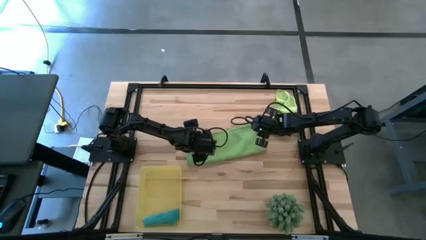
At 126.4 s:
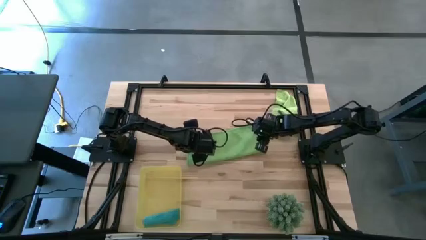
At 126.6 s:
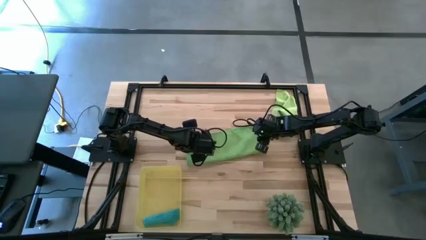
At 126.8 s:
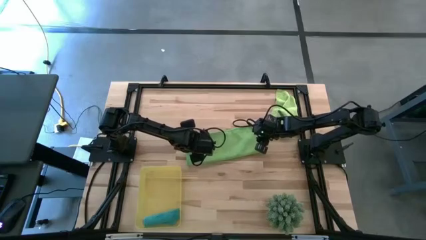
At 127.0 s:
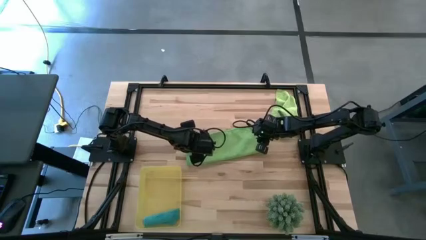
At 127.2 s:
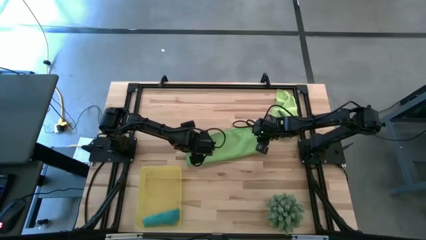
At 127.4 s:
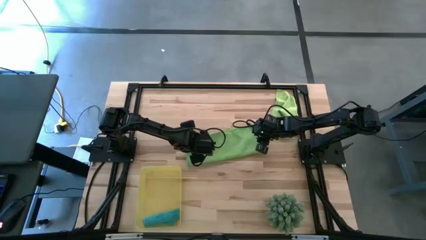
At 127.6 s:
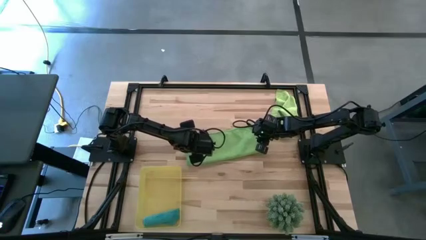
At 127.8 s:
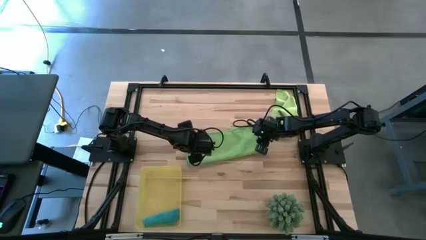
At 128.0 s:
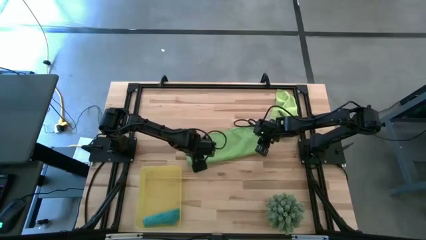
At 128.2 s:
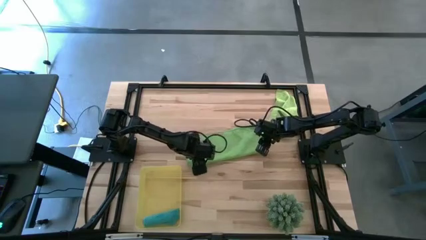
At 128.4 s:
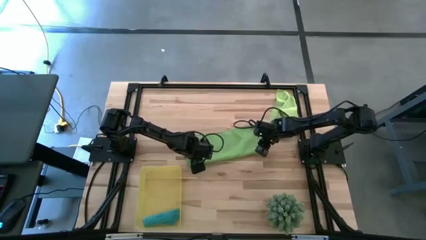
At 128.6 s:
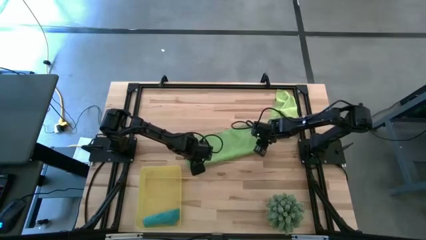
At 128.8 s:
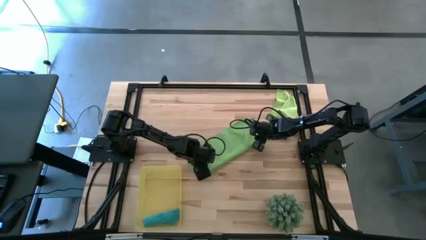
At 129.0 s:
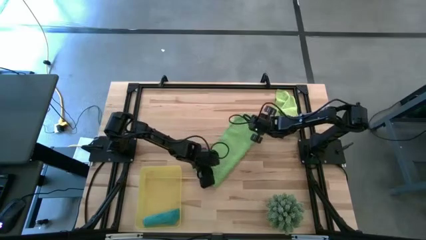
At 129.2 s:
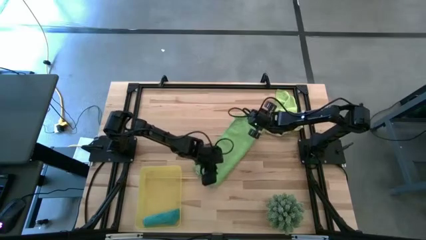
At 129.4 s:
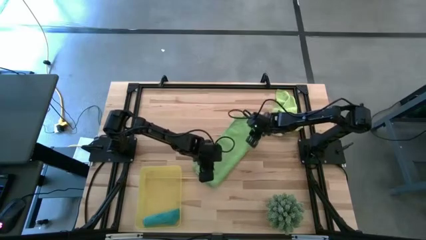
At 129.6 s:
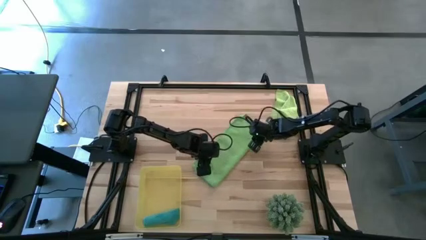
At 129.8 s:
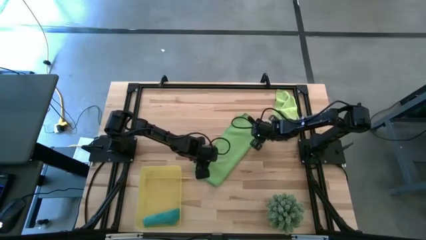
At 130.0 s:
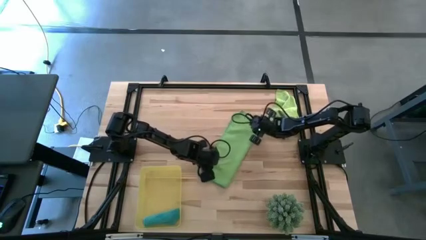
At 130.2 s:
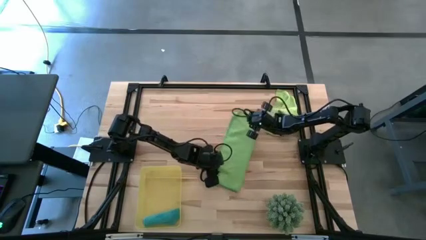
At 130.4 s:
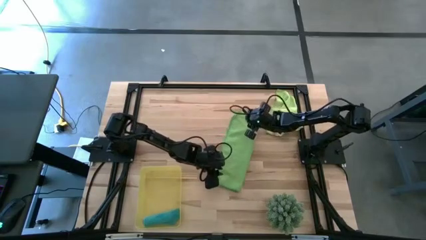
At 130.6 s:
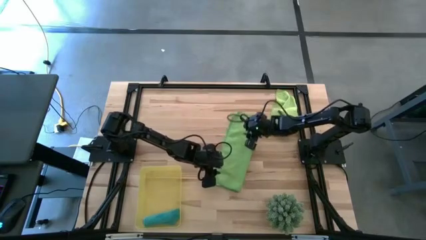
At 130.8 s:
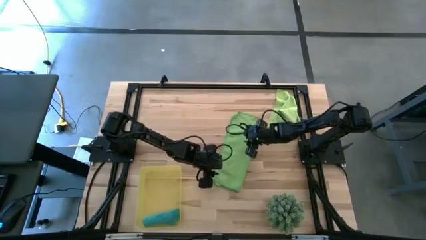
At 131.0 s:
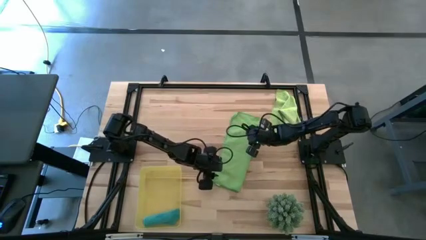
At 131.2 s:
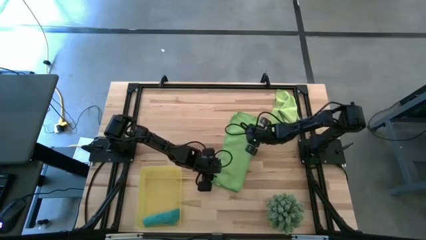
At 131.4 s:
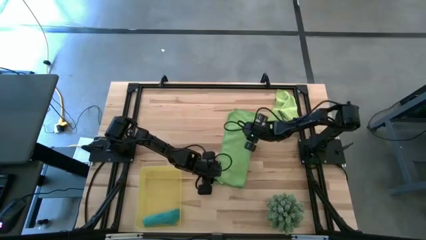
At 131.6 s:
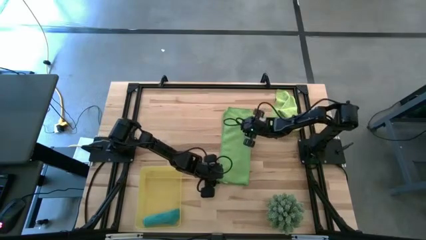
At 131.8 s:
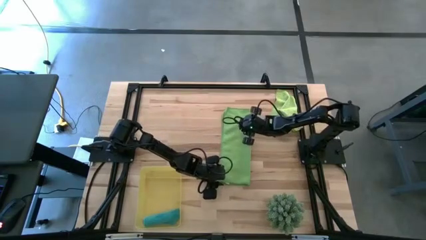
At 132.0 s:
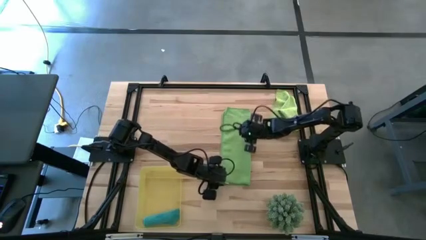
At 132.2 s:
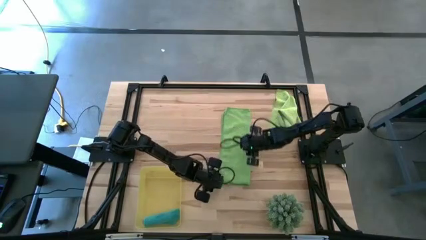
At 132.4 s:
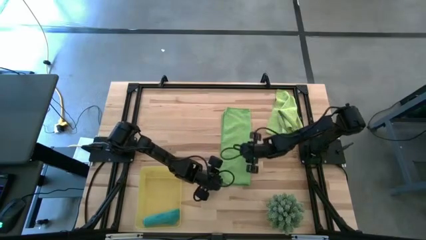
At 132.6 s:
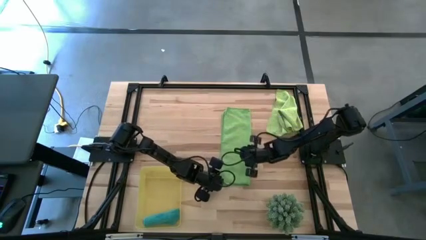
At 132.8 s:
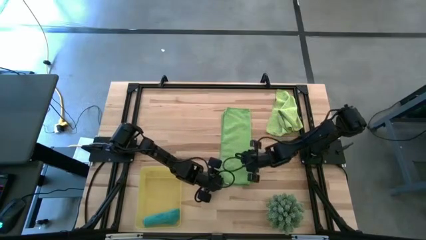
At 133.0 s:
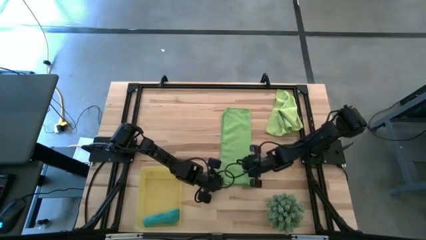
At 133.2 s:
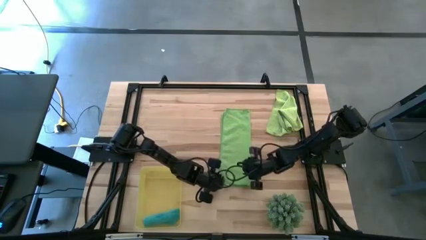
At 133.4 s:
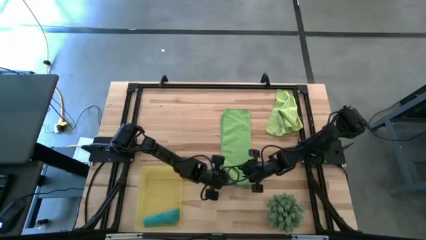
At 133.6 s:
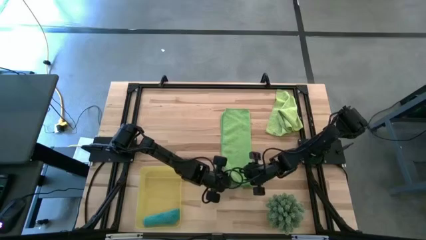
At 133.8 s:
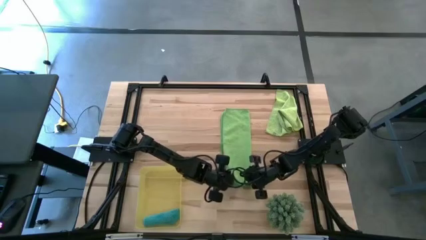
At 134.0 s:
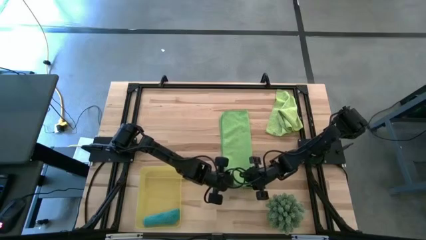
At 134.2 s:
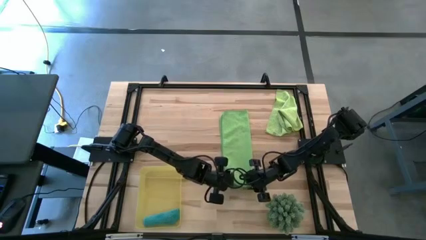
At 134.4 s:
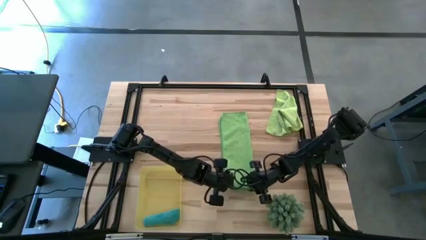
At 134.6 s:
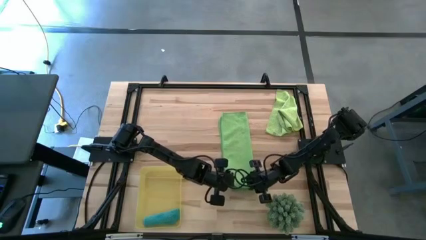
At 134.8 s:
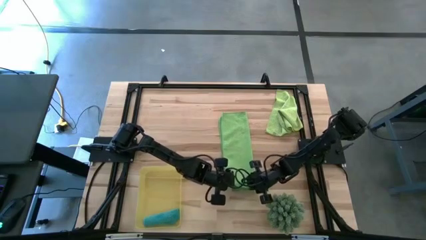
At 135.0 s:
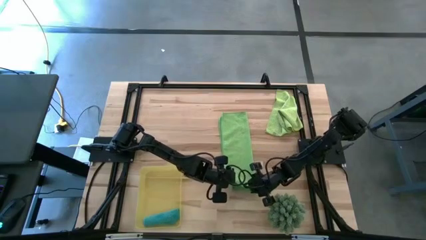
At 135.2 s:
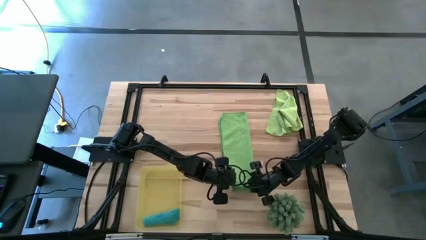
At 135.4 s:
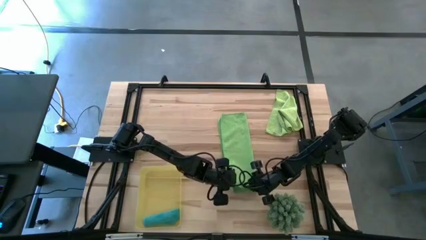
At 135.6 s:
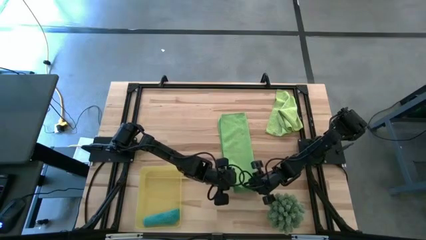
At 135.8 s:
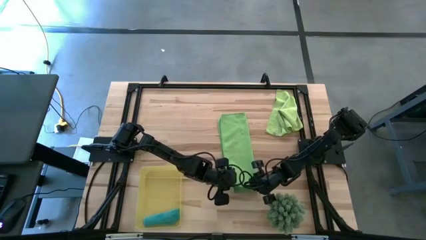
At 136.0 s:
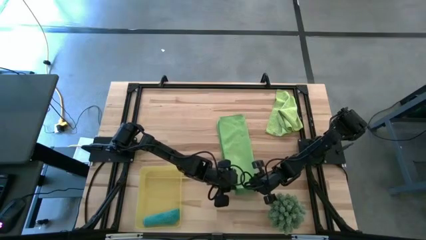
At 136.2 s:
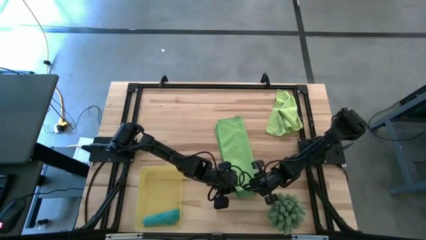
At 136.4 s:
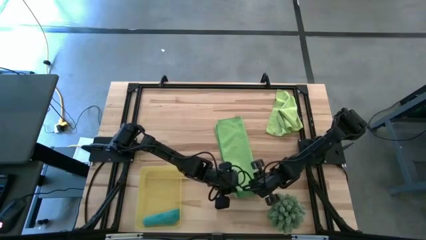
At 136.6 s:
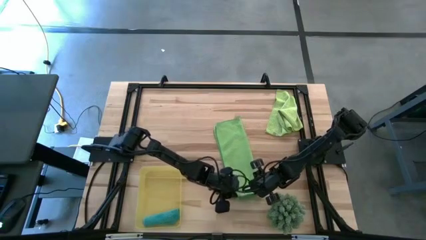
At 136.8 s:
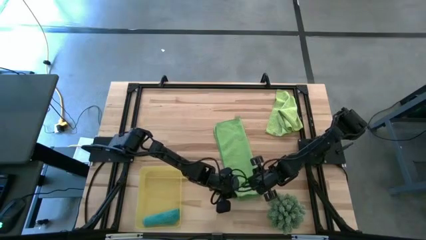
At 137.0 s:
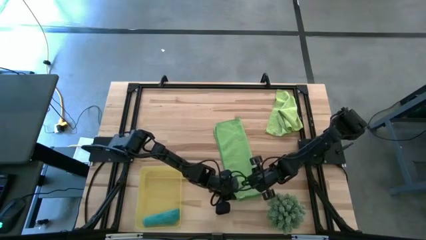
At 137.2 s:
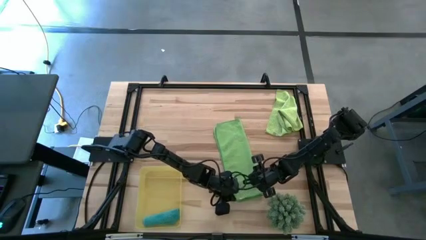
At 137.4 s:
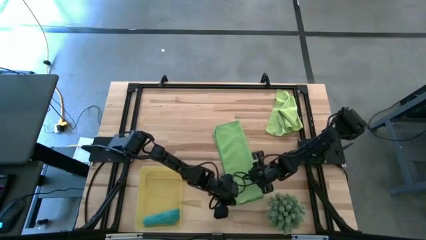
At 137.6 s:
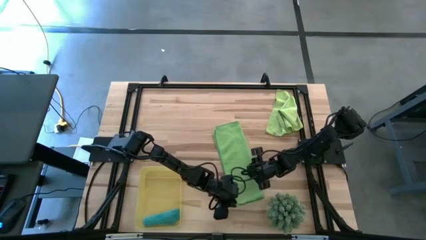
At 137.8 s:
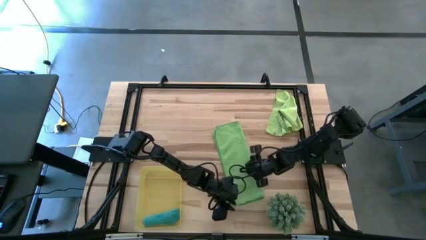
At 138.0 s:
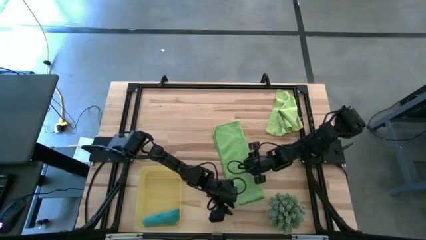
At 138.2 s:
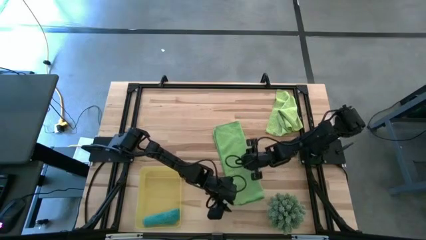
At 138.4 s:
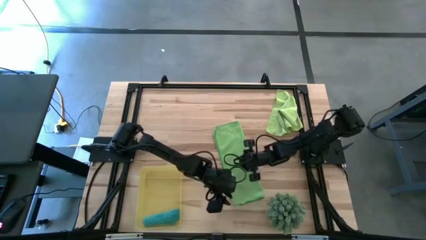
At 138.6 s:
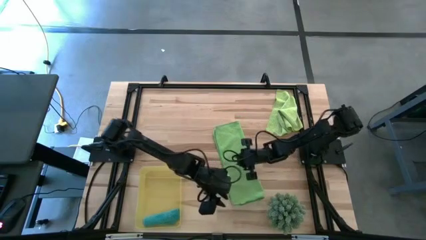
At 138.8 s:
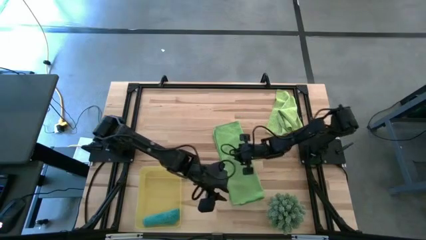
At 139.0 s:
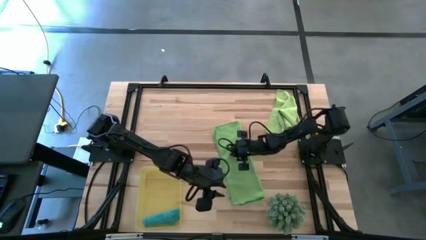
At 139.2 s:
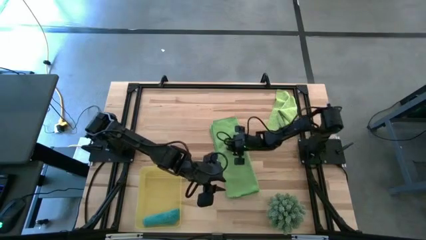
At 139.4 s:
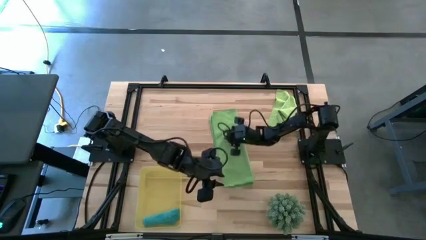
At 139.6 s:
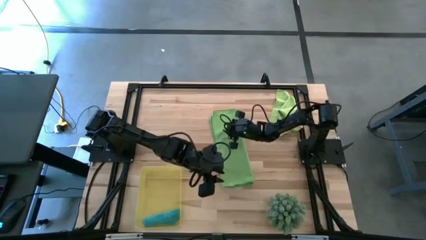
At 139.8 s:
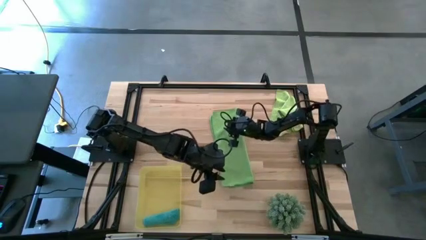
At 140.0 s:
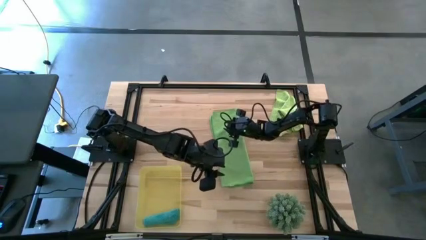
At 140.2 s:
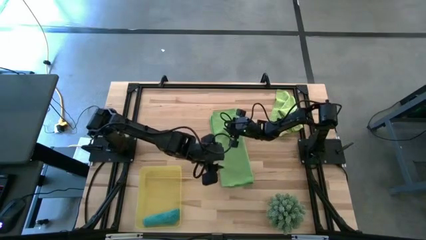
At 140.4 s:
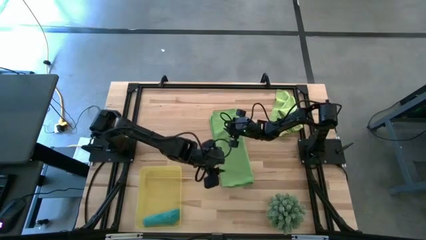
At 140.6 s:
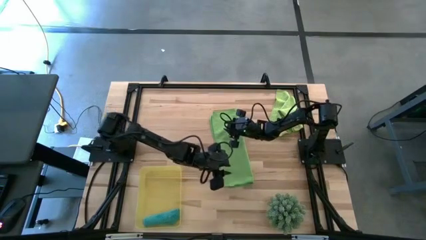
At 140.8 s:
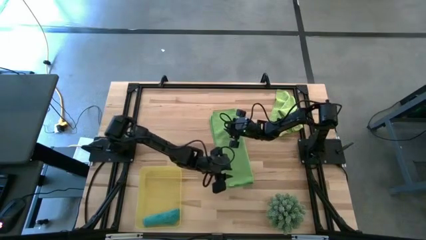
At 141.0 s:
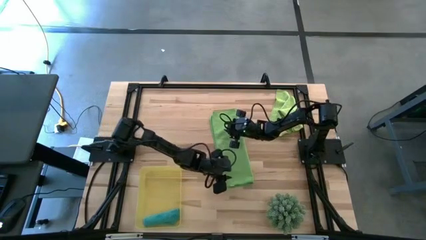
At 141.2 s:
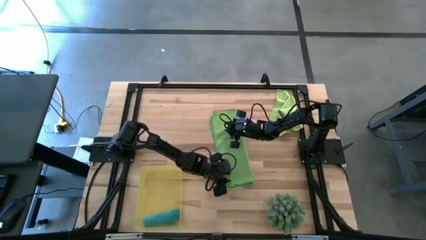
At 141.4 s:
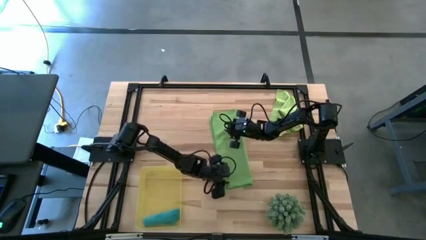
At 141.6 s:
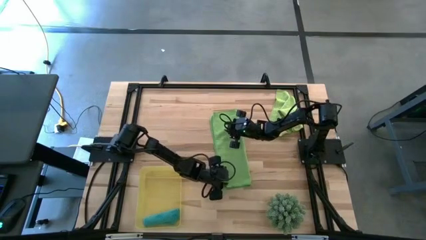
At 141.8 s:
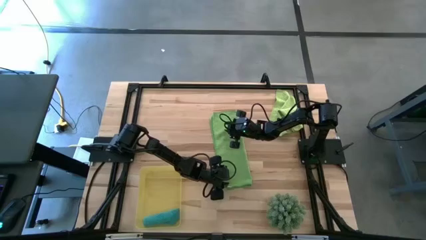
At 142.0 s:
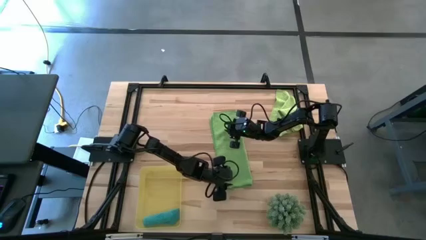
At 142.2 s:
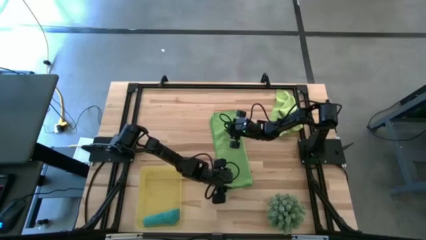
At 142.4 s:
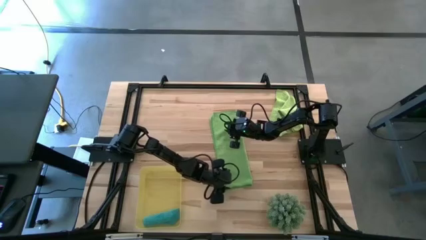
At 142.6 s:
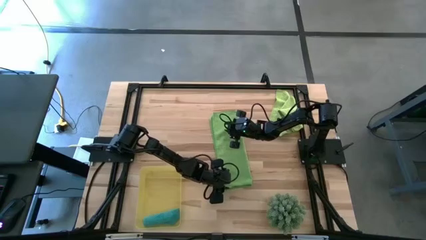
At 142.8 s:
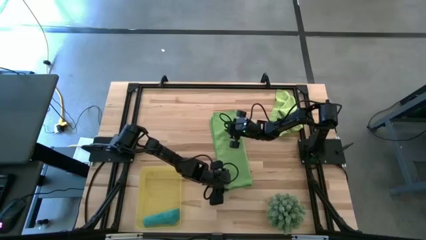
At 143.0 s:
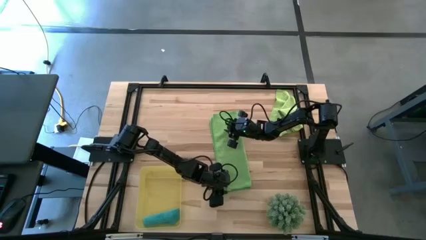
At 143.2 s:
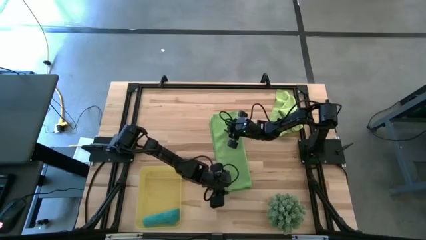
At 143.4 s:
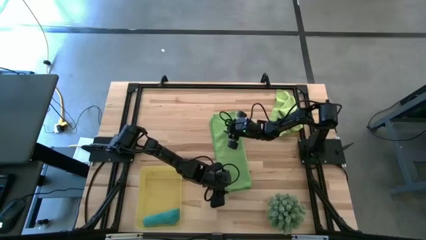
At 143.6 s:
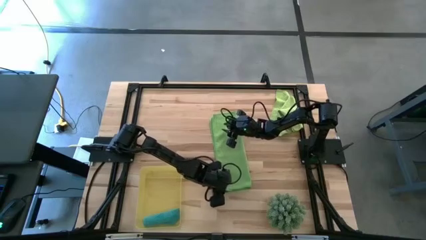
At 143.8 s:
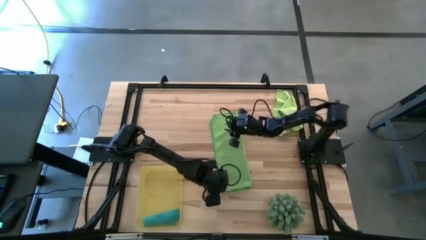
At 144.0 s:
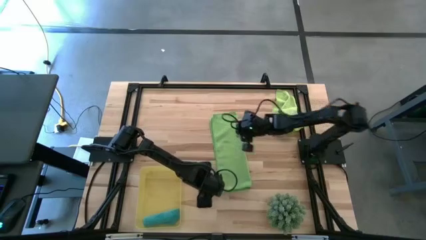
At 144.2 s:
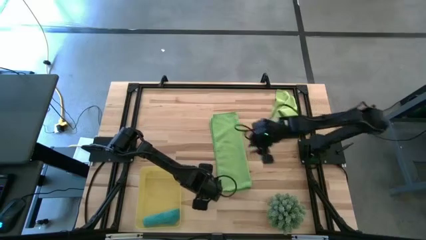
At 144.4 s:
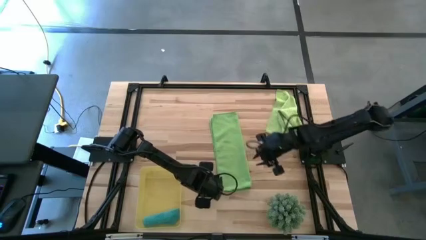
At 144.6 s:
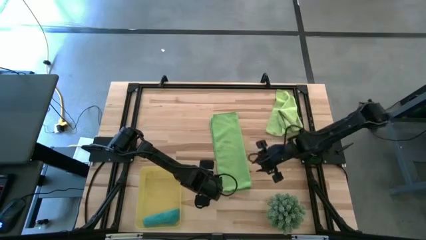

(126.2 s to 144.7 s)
Task: Roll microfiber towels into tight, uniform cylinder then place into a basket
Roll the green microfiber towel
